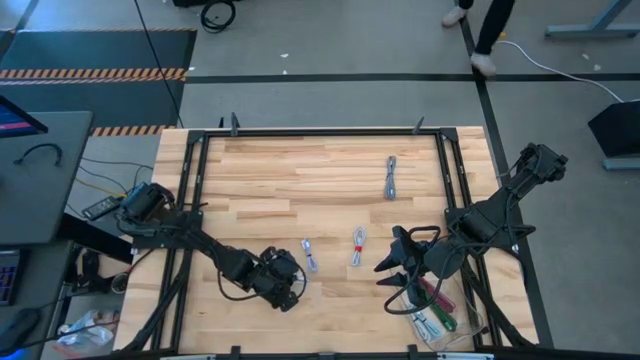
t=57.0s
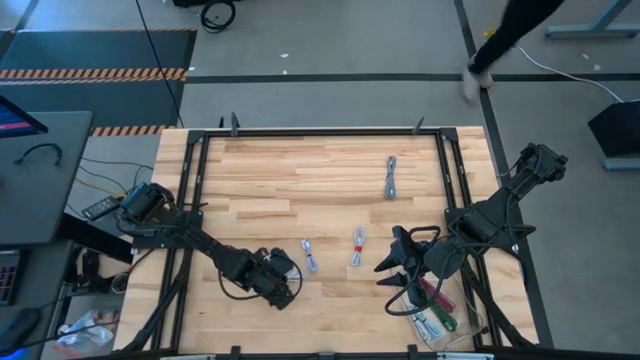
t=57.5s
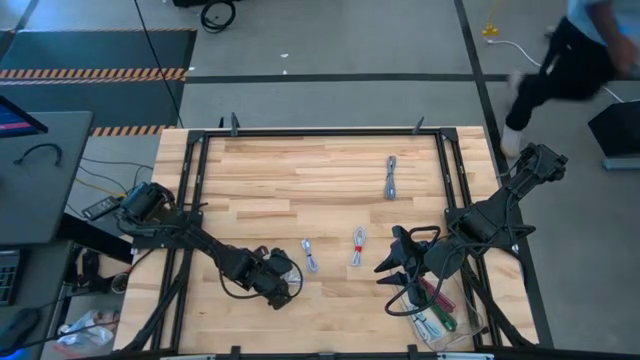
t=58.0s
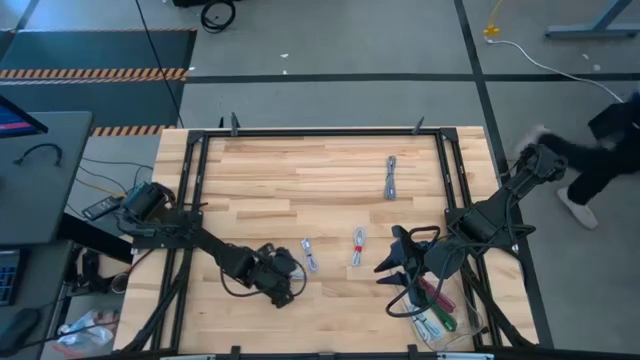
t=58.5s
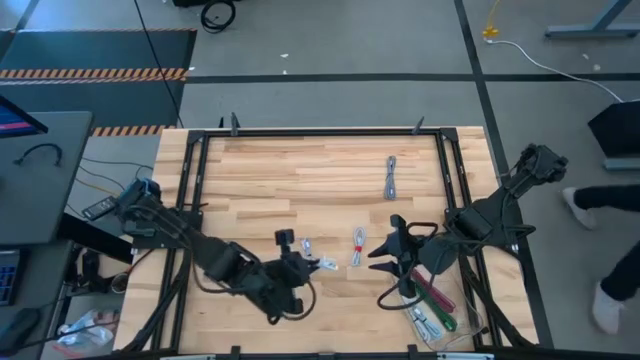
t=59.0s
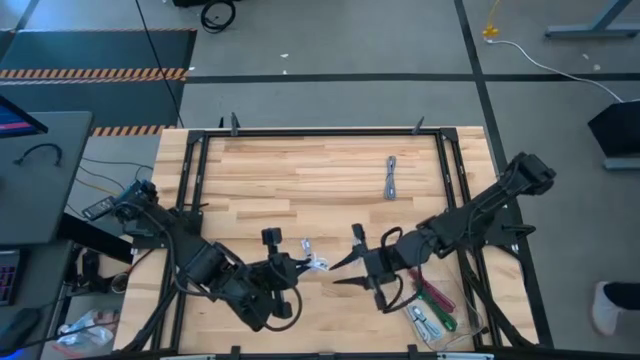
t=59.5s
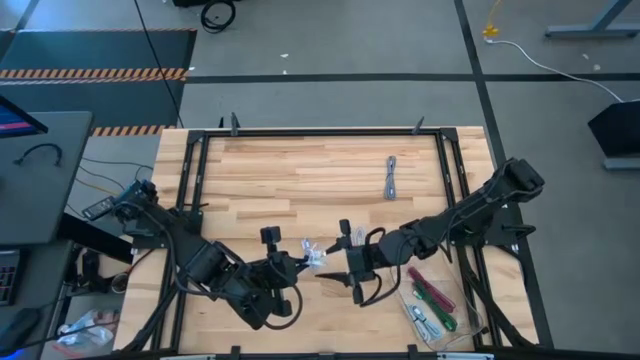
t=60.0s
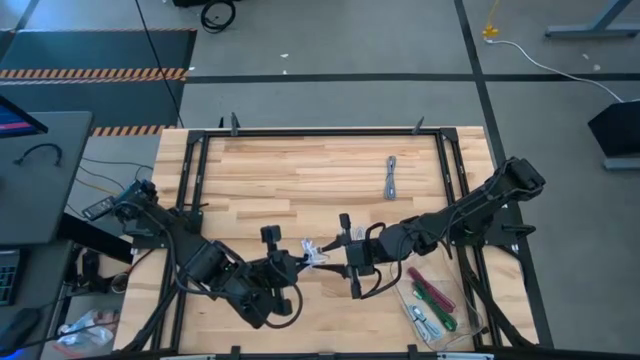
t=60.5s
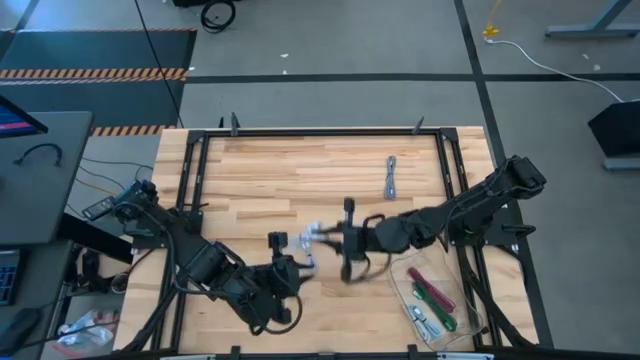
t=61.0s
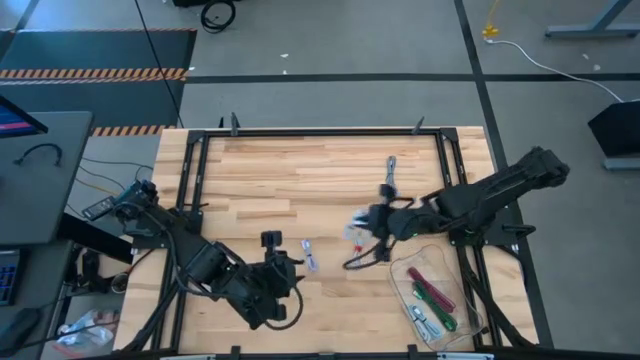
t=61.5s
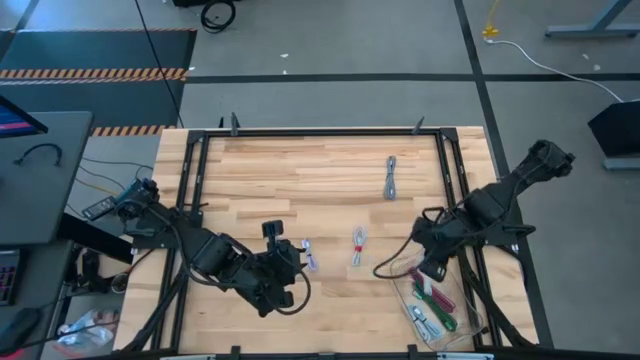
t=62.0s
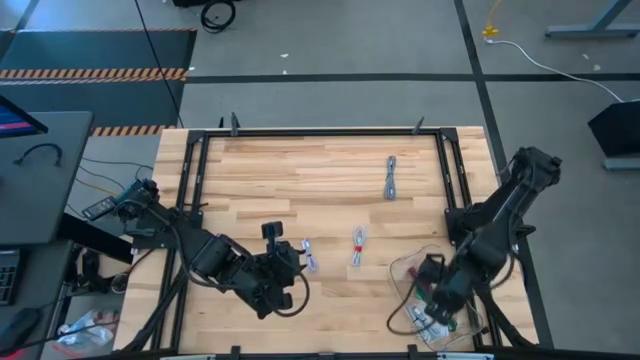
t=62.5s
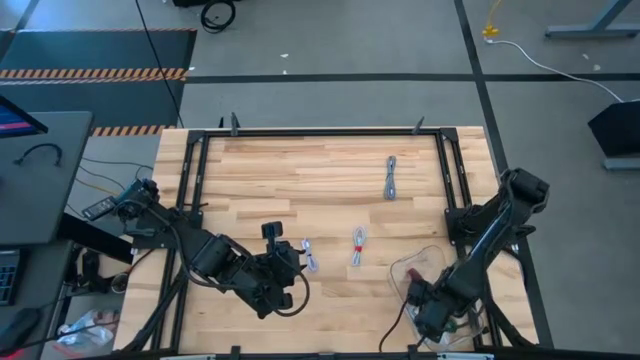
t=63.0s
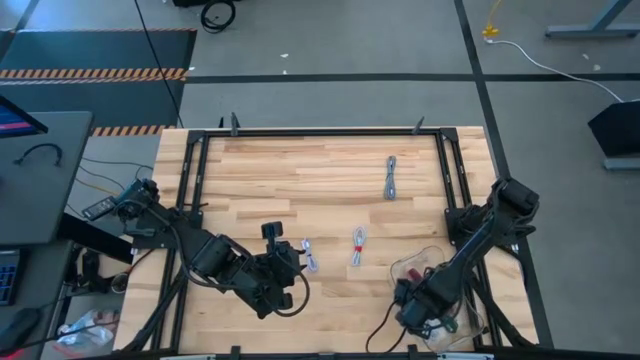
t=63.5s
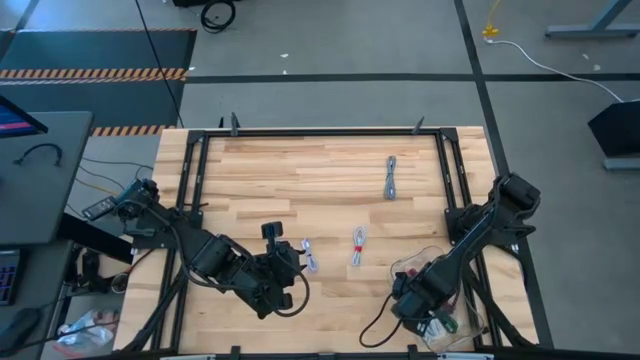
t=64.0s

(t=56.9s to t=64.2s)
Task: Pick and place USB-C Cables
Put the bottom white charger cable into the transparent bin

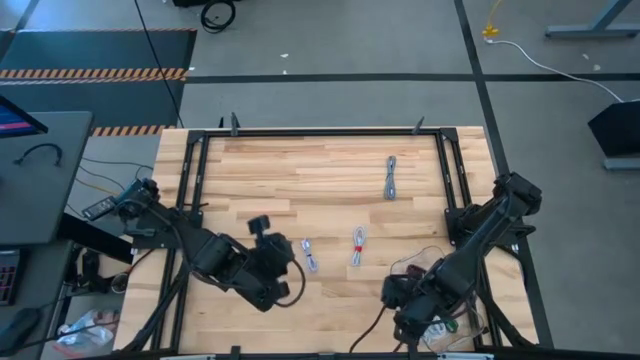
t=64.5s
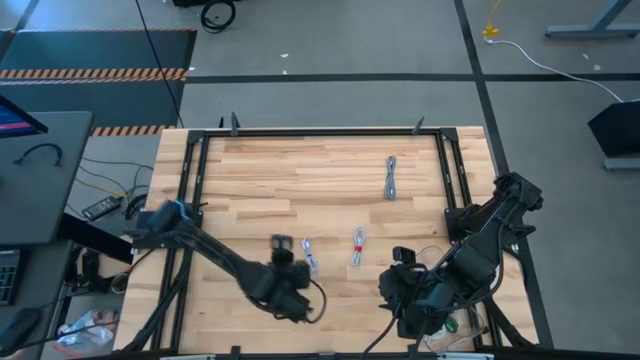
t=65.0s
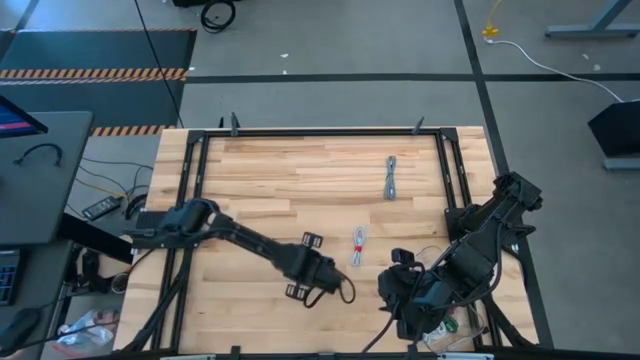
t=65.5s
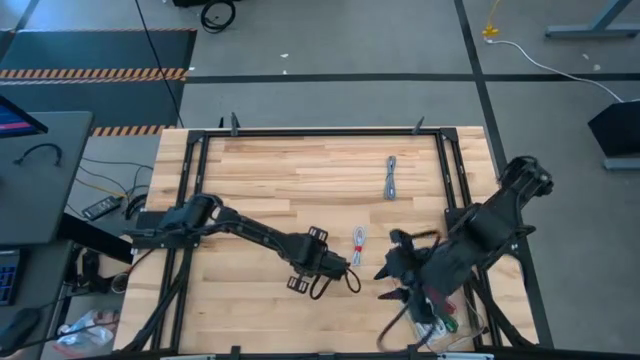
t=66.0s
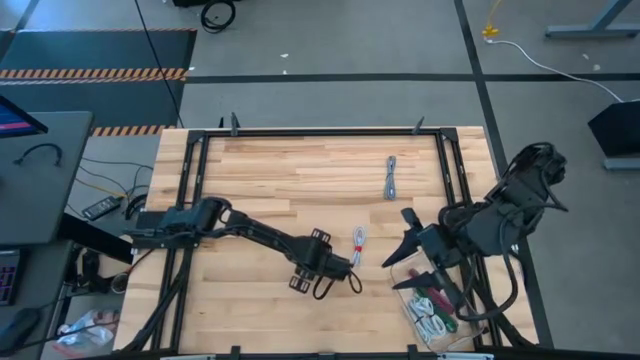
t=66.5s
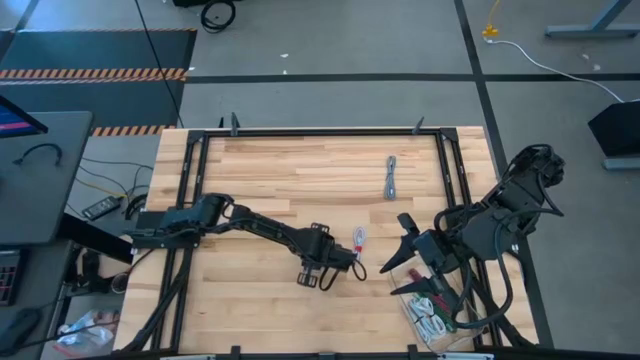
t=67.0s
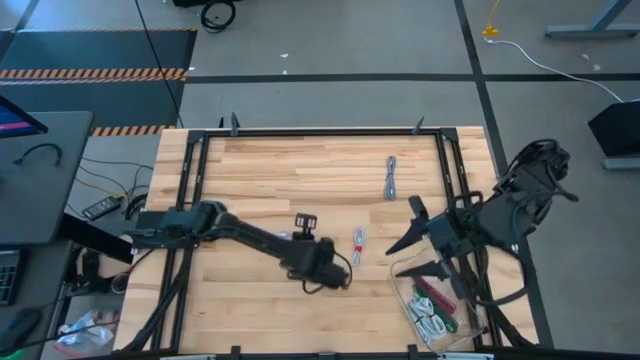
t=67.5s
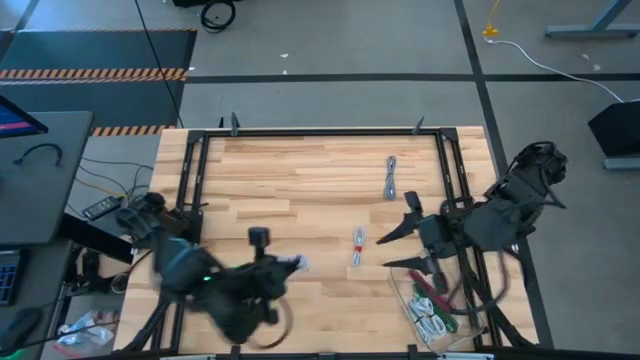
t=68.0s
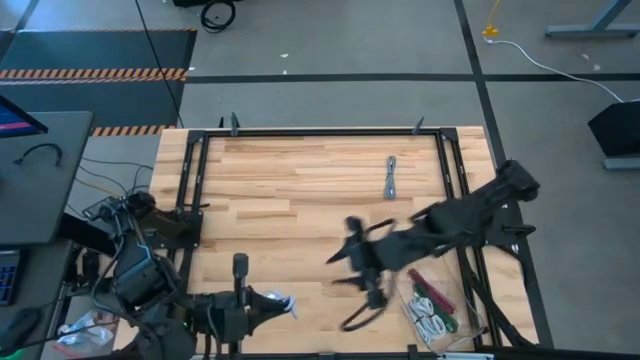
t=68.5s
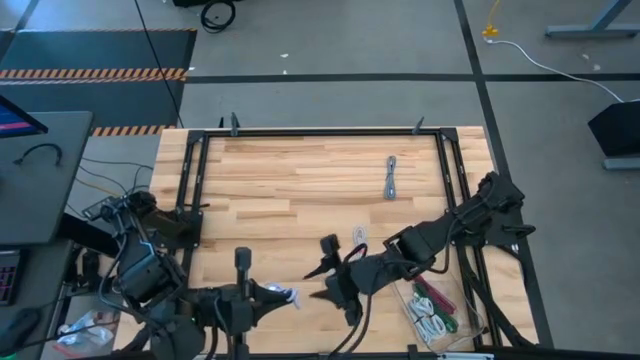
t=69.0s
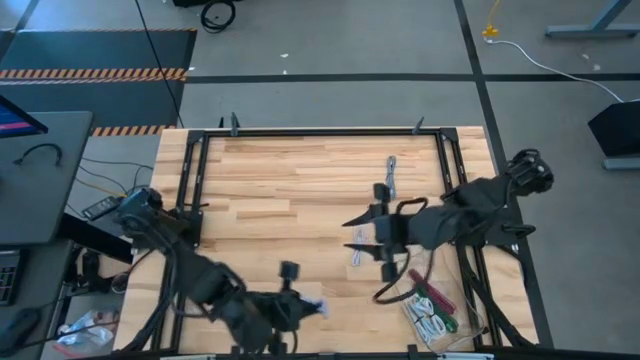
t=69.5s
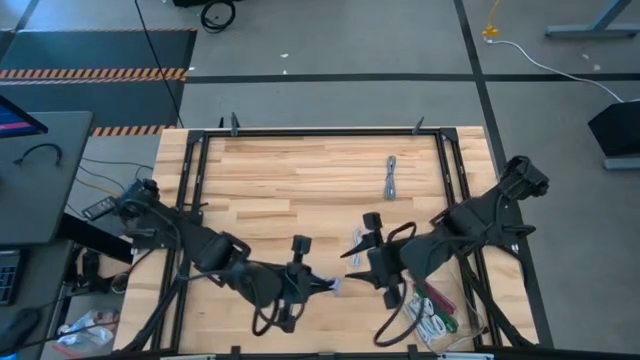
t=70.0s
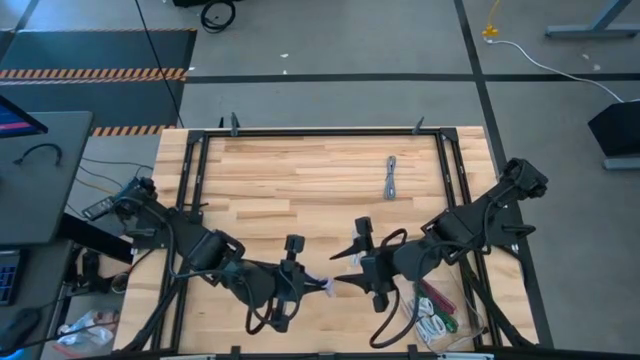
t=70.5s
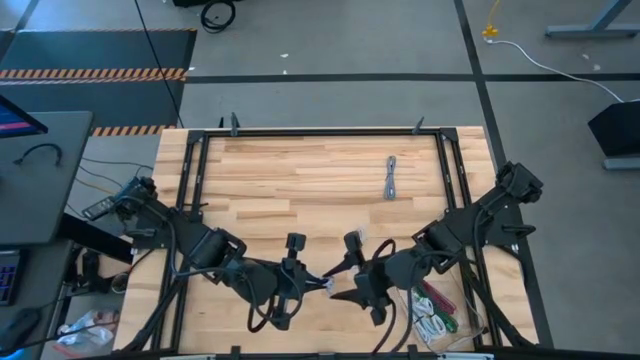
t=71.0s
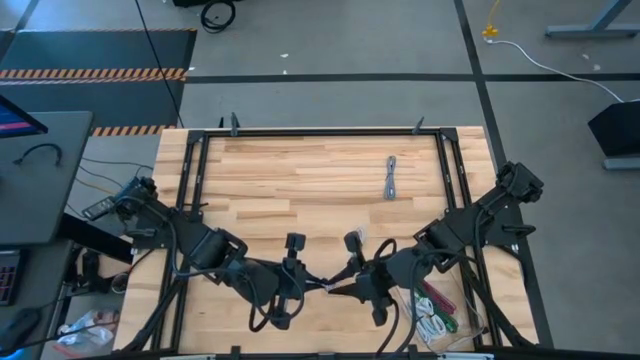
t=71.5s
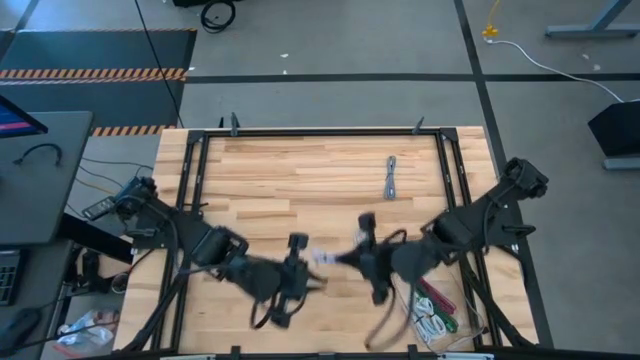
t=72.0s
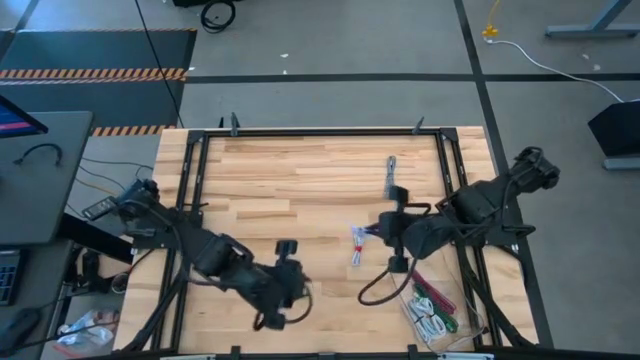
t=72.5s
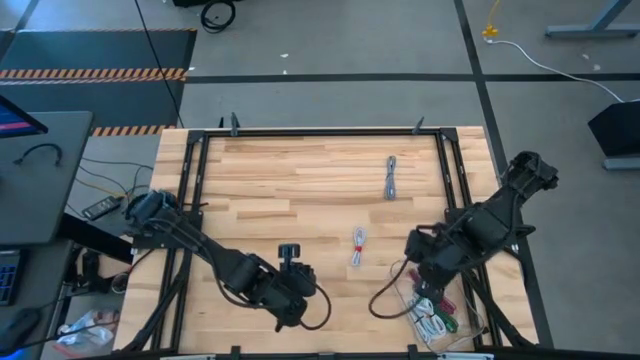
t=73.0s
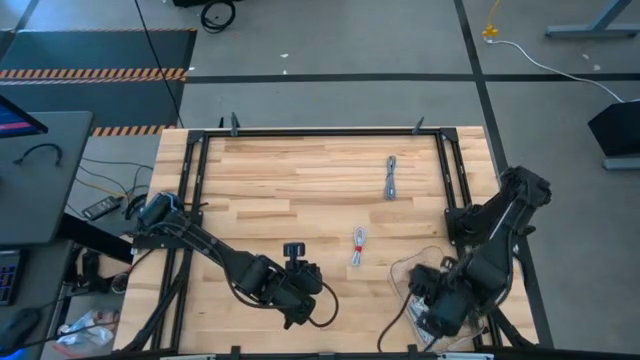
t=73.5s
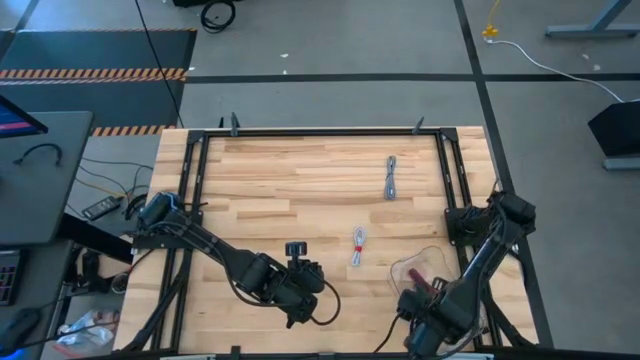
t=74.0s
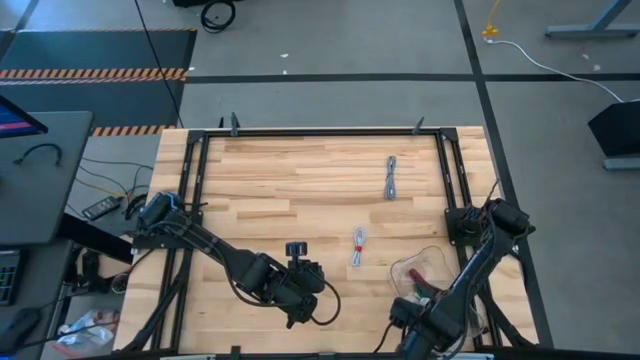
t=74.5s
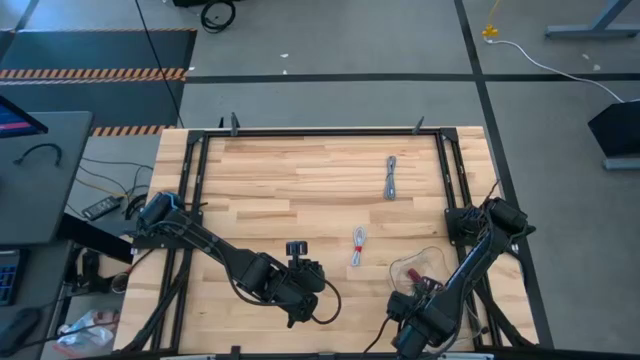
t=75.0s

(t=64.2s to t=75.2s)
Put the purple charger cable into the transparent bin

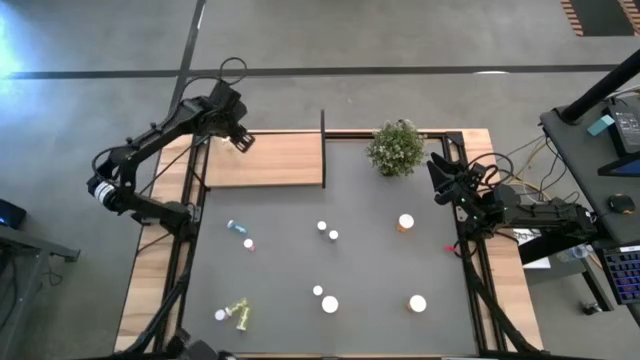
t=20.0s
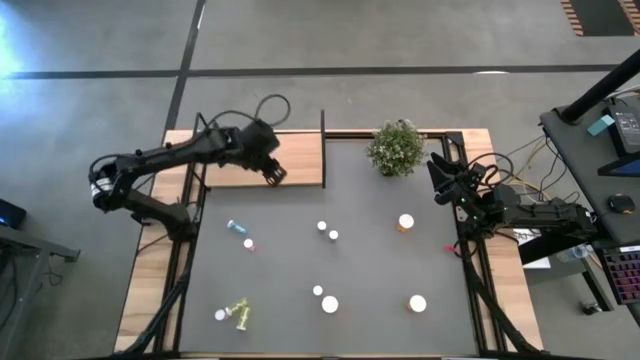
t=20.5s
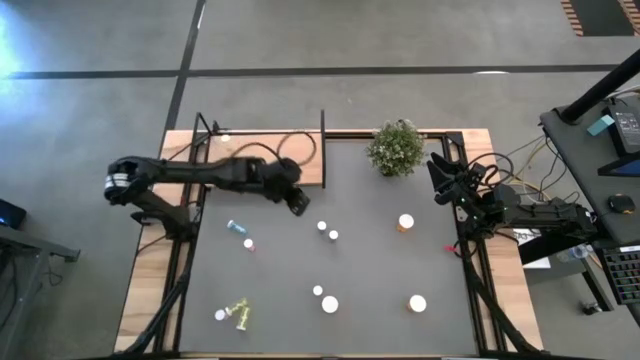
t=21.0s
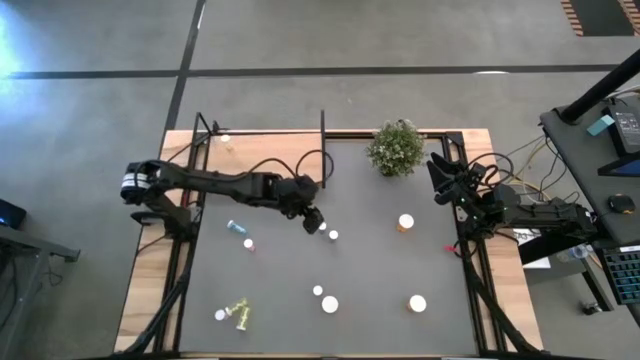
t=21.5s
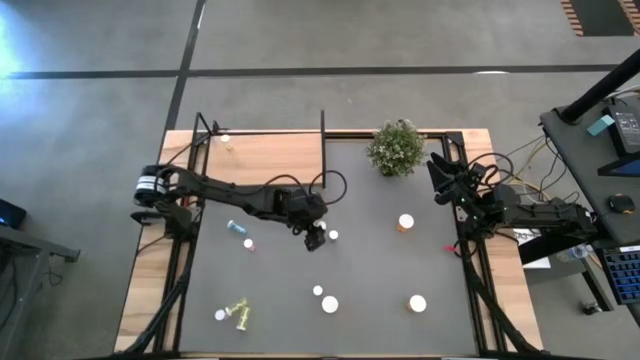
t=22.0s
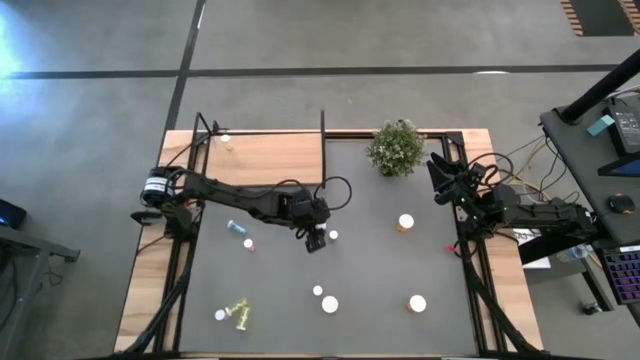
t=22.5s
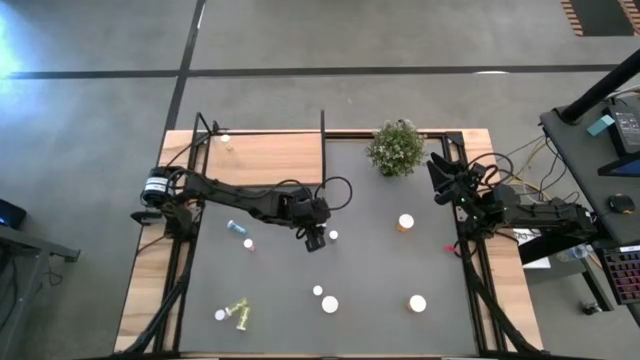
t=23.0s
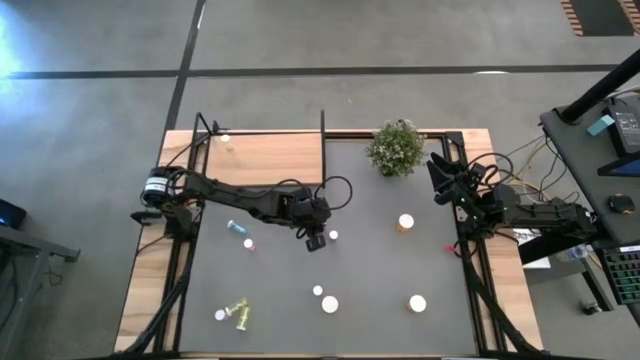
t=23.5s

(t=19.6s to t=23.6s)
Task: Pick and place medicine bottles onto shelf by color
Put the middle blue pill bottle on the shelf
